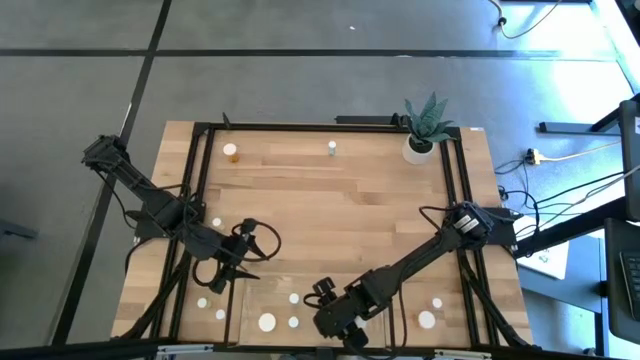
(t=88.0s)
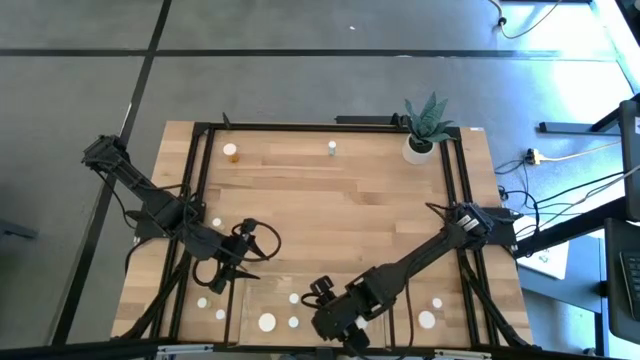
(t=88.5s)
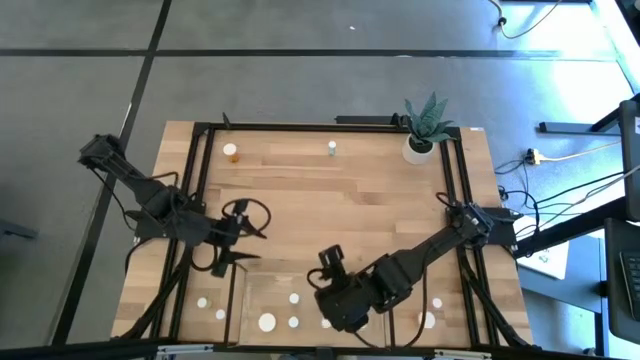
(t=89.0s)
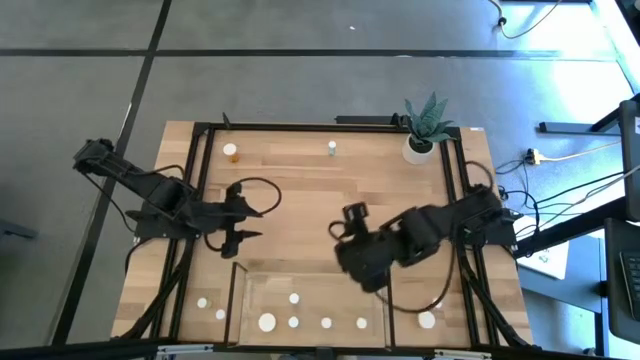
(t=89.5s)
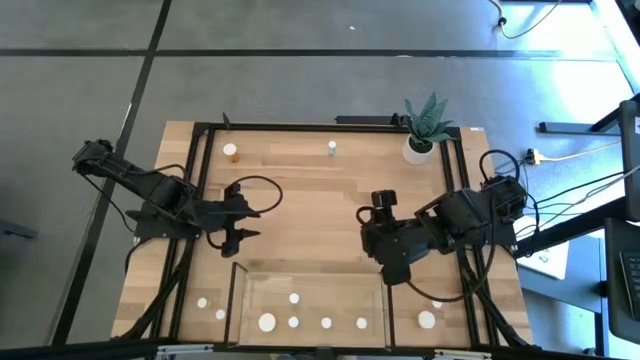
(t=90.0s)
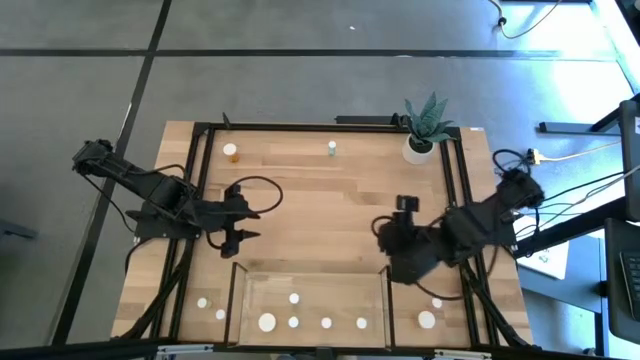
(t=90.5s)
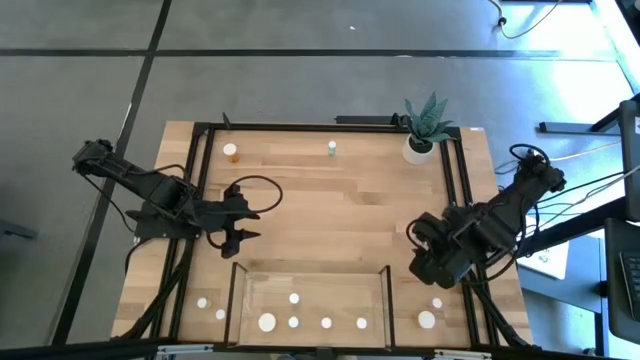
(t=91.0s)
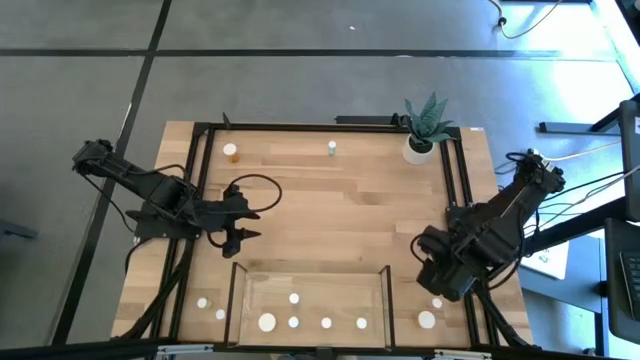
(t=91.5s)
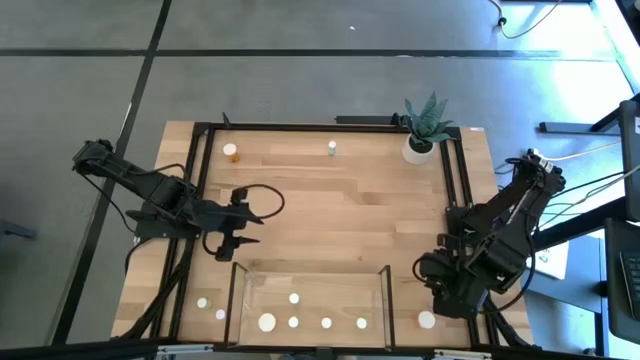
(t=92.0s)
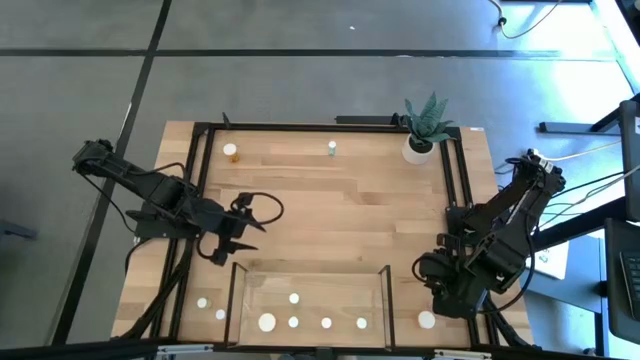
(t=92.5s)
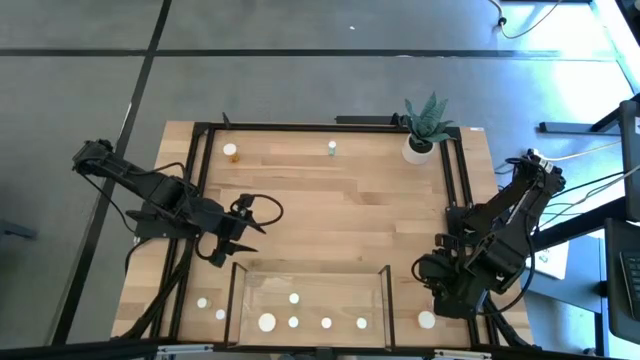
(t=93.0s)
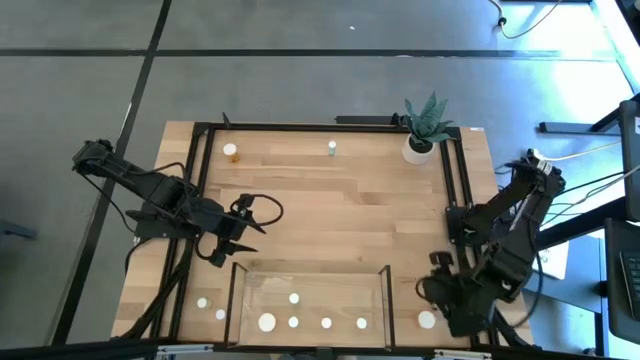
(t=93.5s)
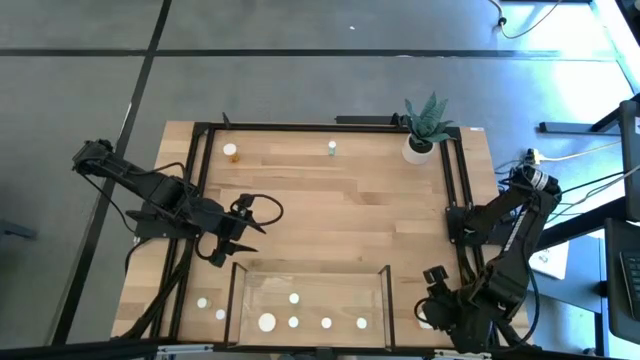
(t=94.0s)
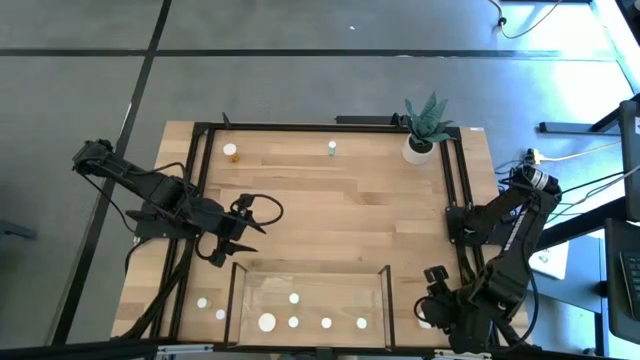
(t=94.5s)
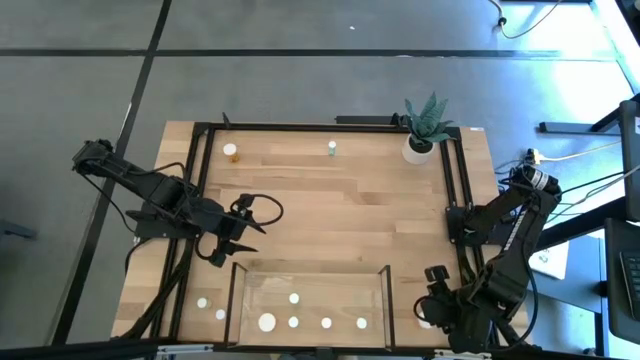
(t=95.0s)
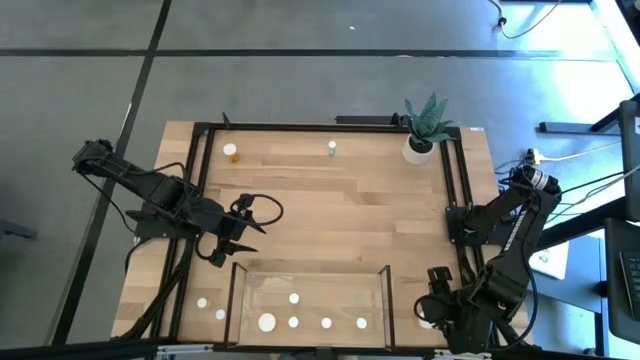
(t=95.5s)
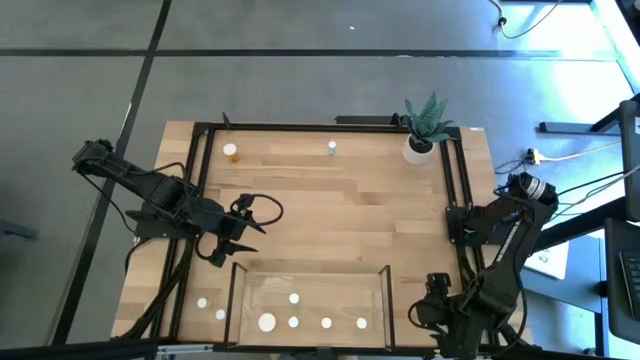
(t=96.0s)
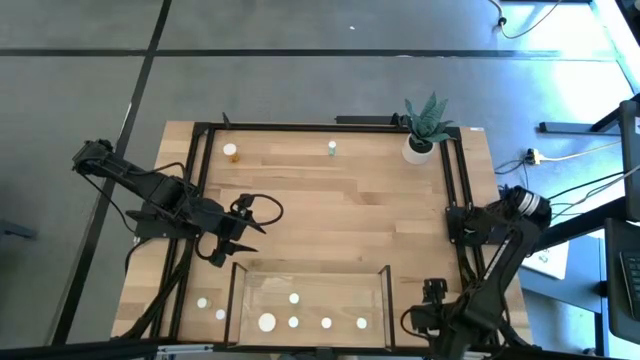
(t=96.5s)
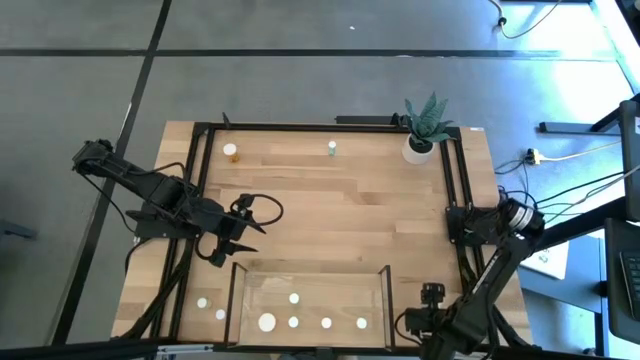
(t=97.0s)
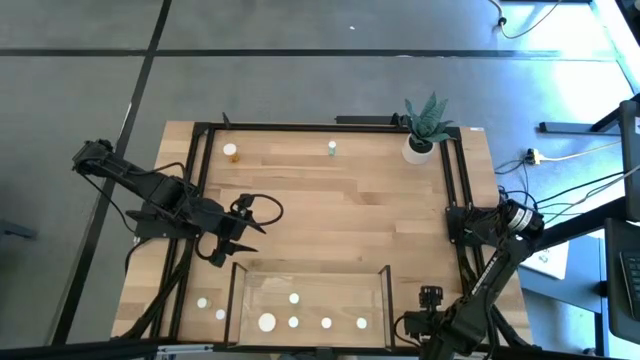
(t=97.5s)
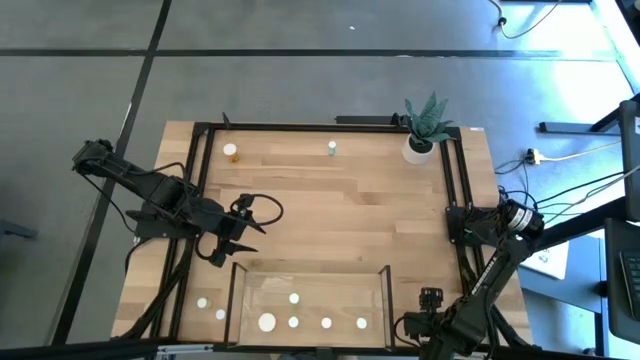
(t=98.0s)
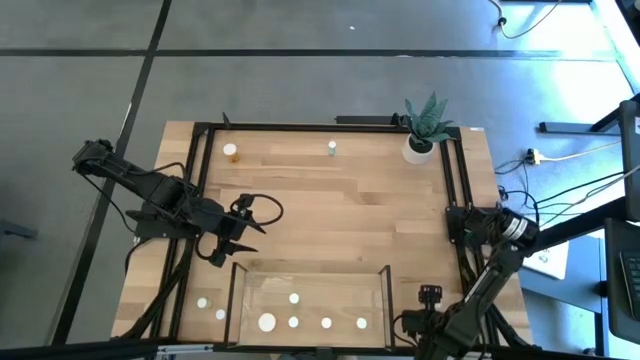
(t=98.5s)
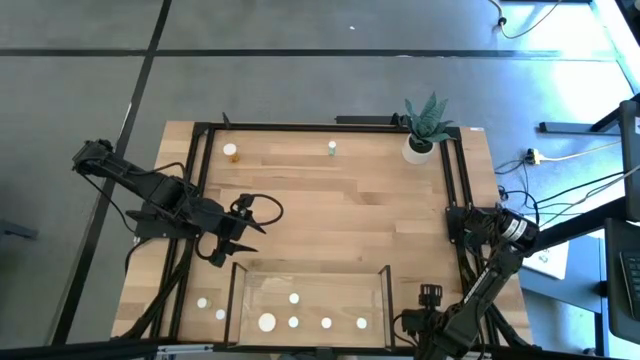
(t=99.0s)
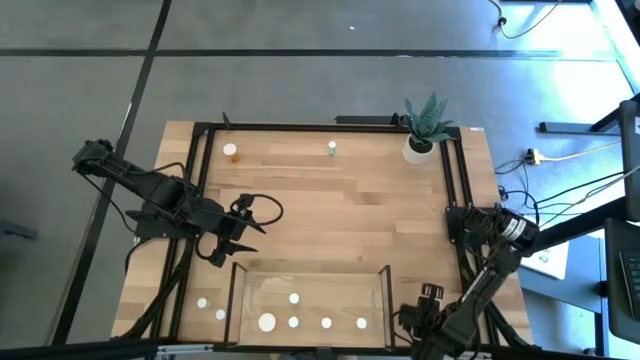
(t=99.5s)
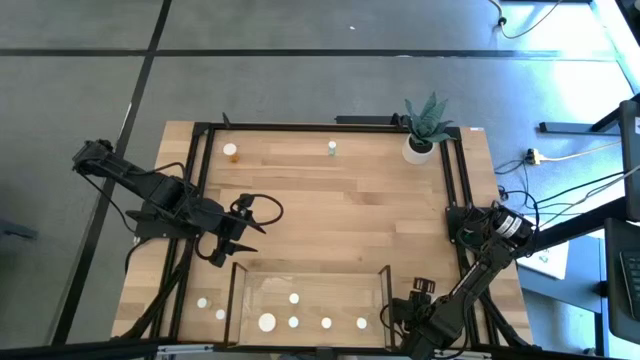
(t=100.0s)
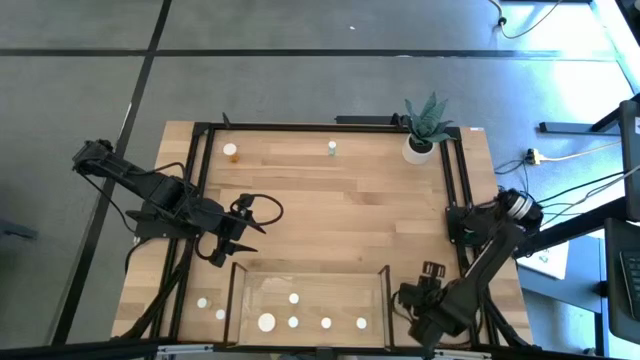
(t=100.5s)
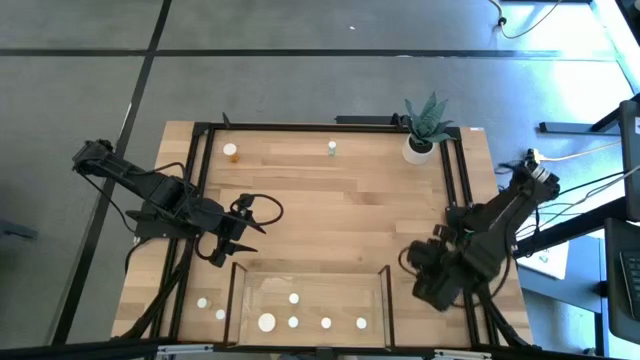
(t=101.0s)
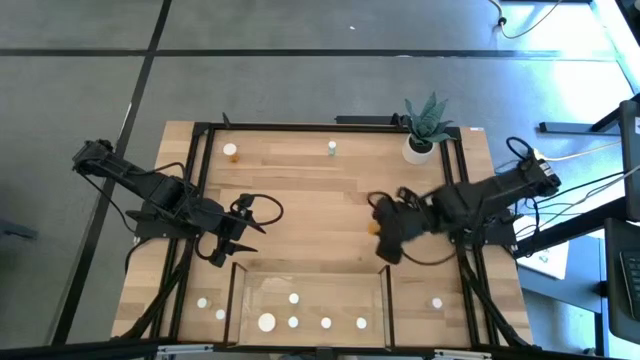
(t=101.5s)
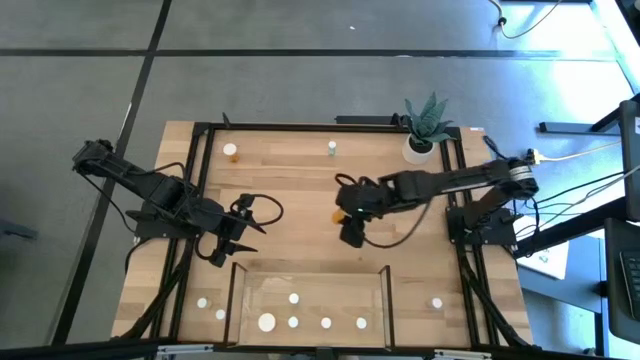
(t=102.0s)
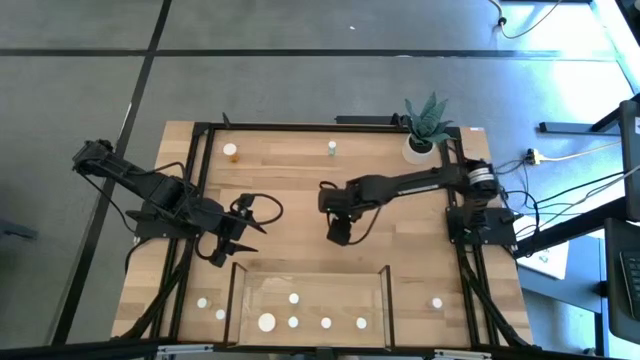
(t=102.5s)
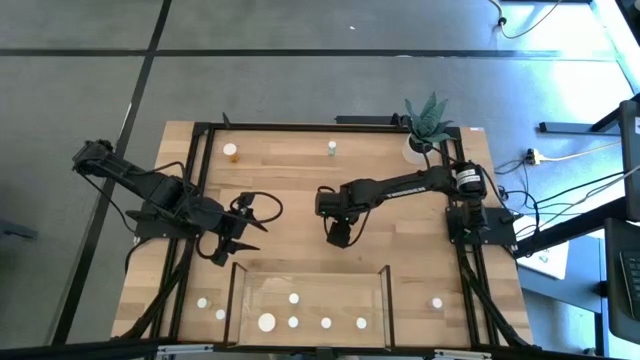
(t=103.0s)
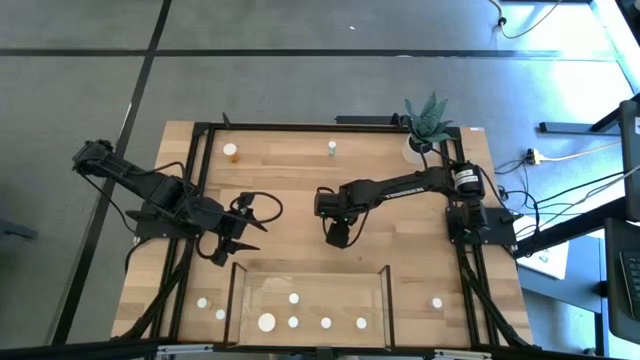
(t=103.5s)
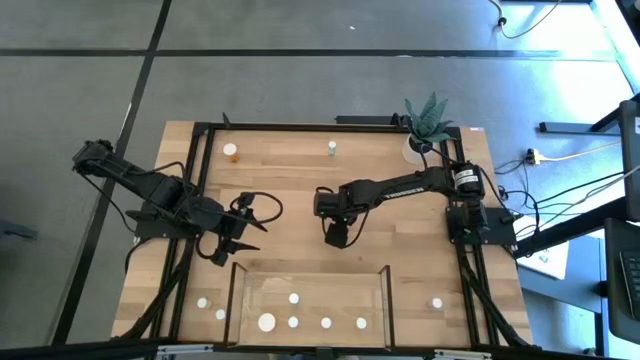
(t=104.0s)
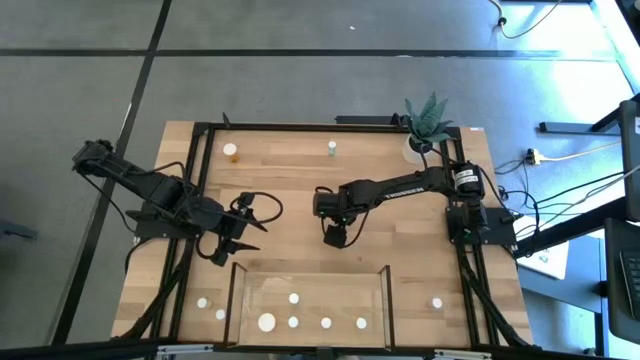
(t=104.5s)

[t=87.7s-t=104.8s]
Task: Pick and place medicine bottles onto shelf by color
Put the bottom orange pill bottle on the shelf aligned with the other orange pill bottle

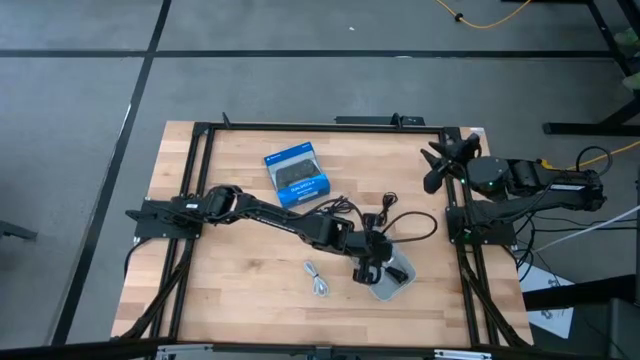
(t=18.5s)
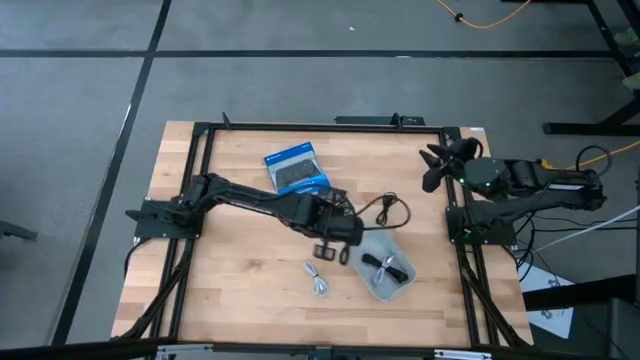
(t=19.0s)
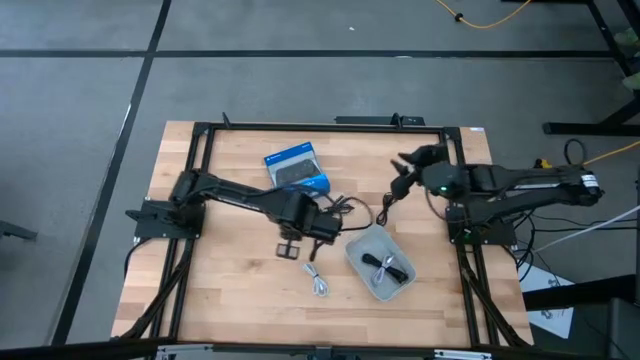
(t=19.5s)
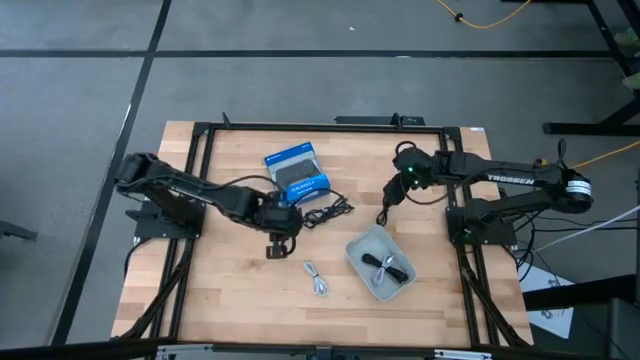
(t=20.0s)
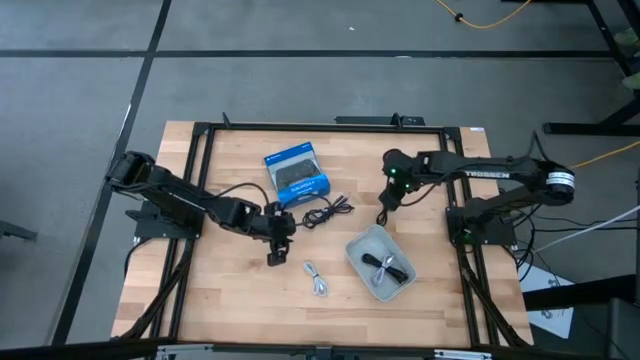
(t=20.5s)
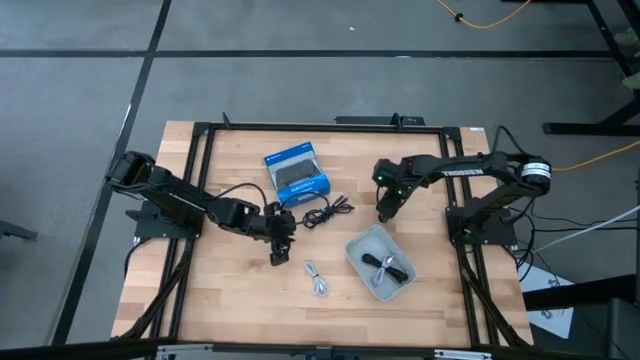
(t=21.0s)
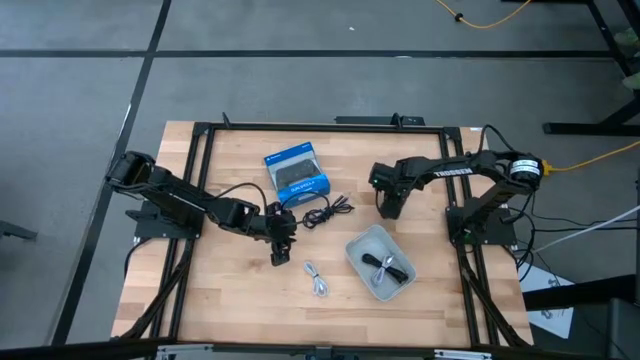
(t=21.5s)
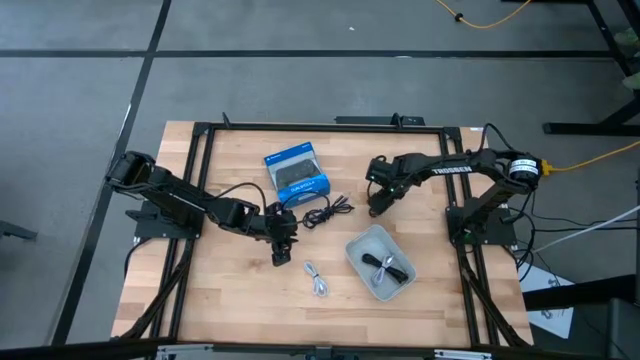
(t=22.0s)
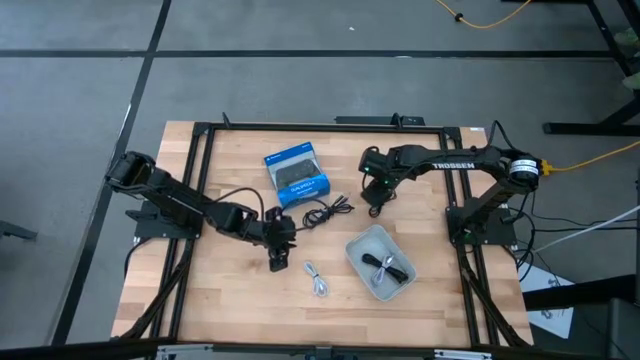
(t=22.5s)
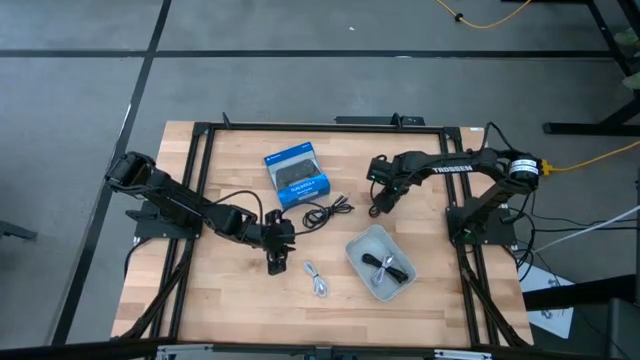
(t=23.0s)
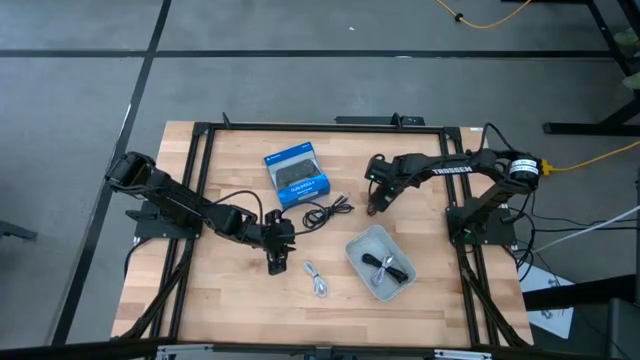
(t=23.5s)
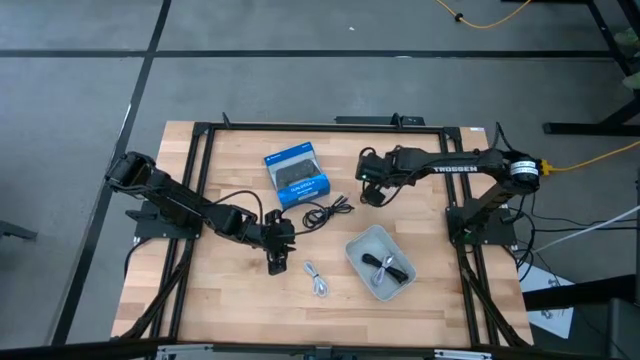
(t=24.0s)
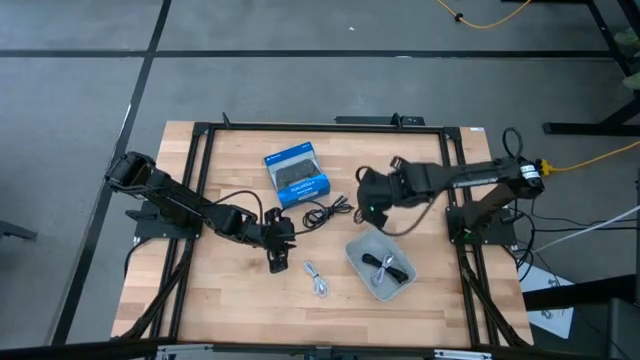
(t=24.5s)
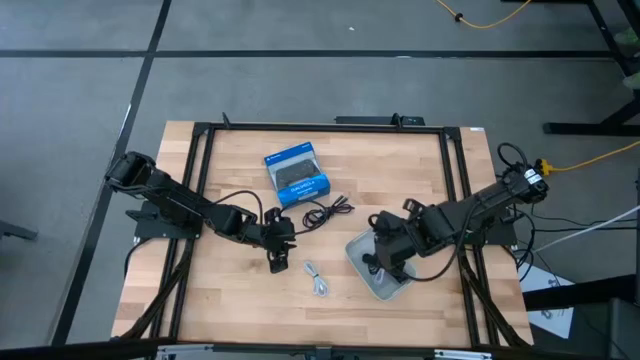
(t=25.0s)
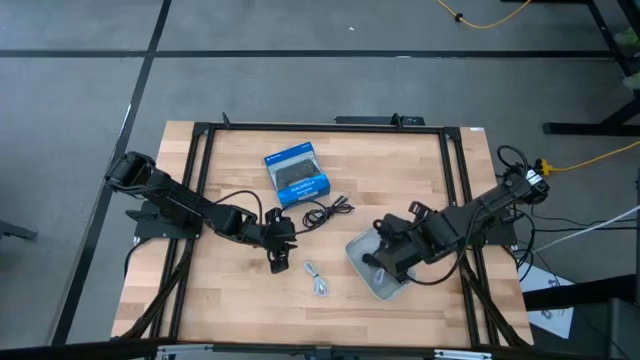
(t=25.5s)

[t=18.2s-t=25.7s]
Task: Pick and place USB-C Cables
Put the right black charger cable into the white bin
